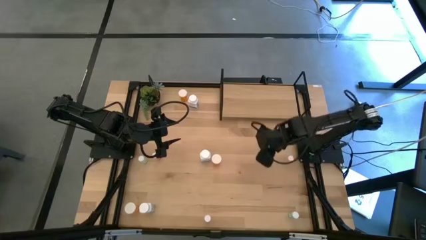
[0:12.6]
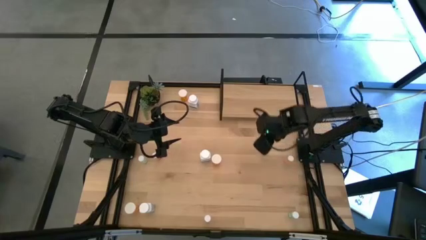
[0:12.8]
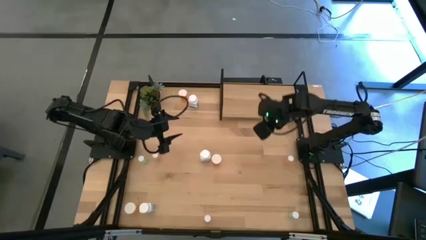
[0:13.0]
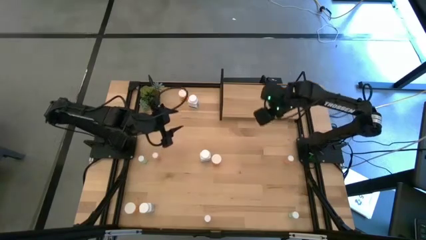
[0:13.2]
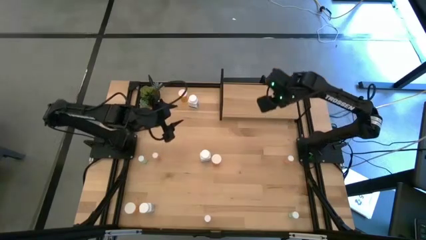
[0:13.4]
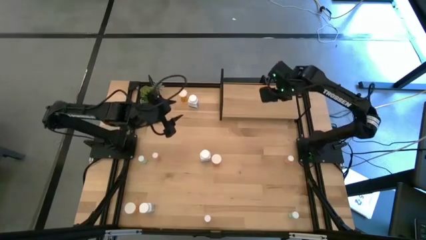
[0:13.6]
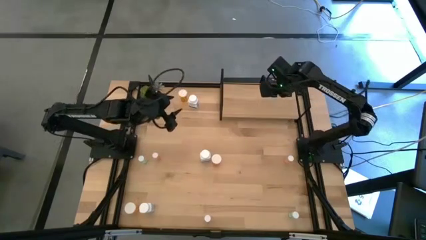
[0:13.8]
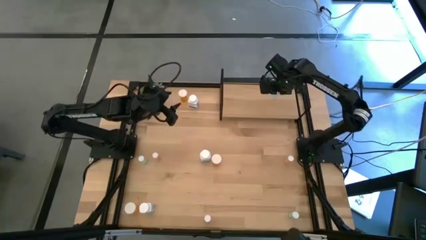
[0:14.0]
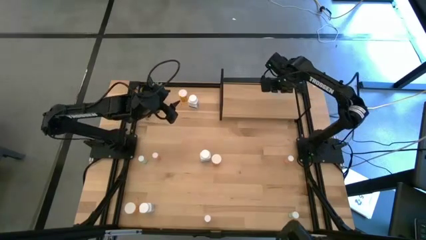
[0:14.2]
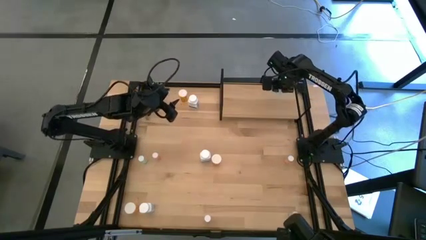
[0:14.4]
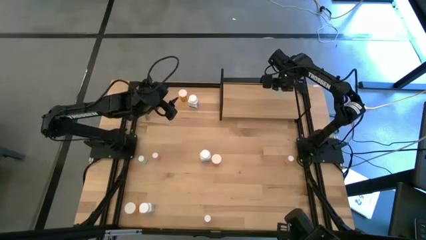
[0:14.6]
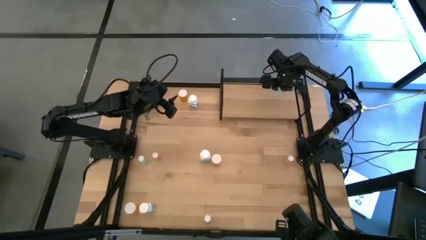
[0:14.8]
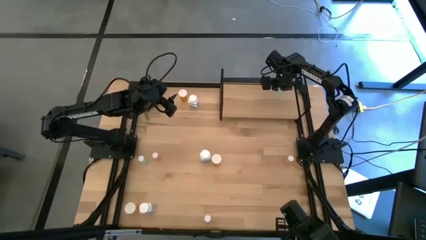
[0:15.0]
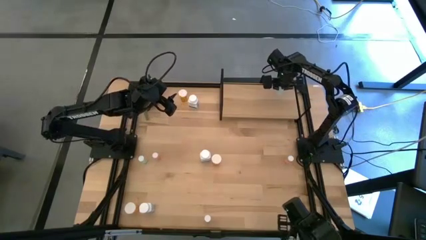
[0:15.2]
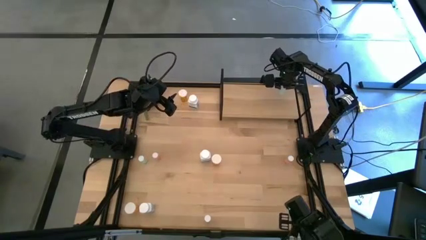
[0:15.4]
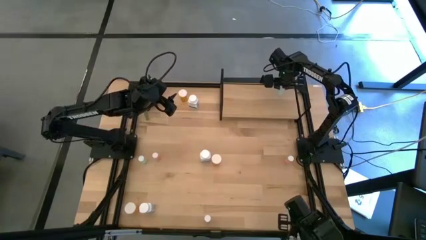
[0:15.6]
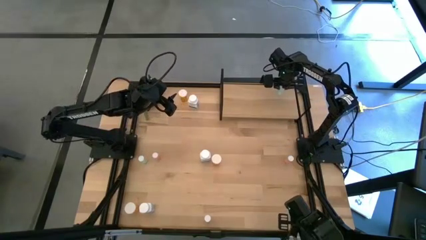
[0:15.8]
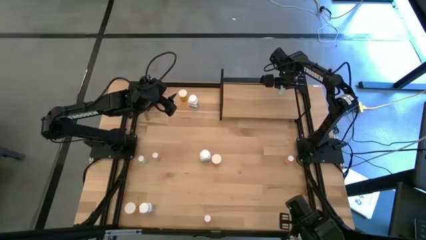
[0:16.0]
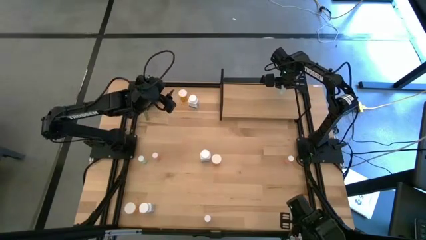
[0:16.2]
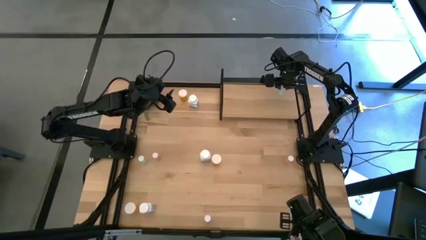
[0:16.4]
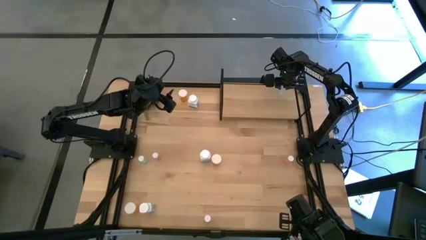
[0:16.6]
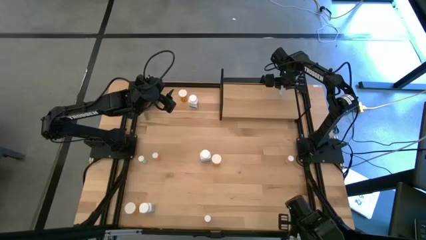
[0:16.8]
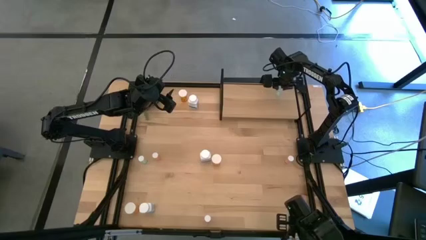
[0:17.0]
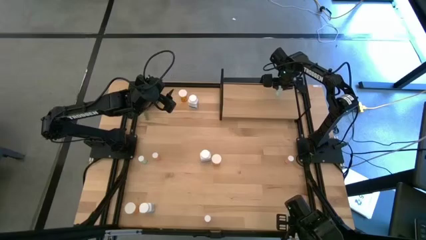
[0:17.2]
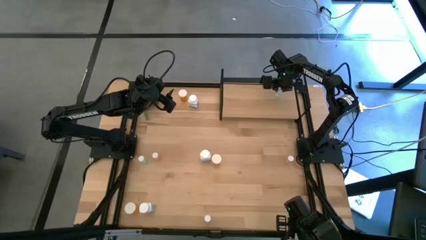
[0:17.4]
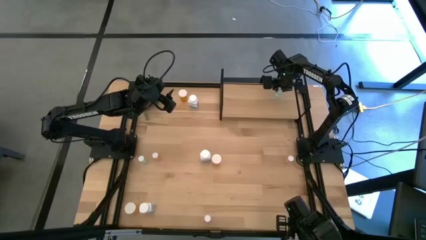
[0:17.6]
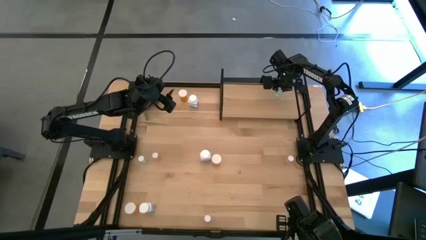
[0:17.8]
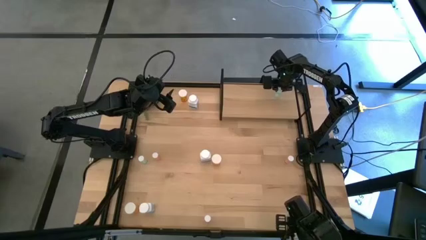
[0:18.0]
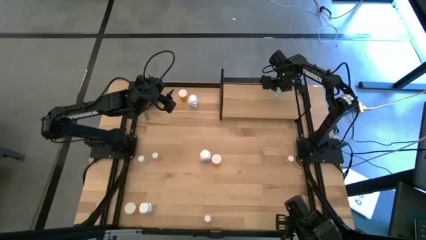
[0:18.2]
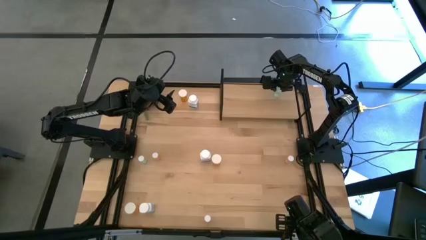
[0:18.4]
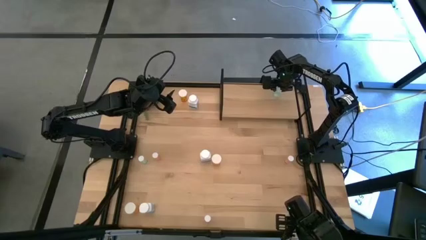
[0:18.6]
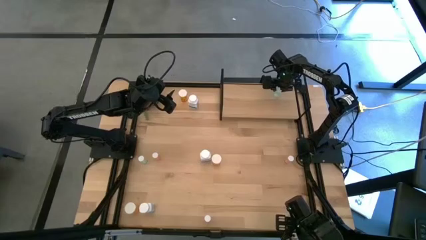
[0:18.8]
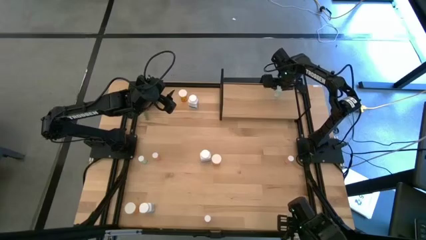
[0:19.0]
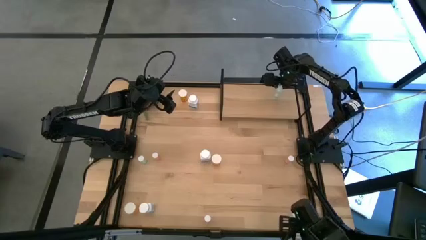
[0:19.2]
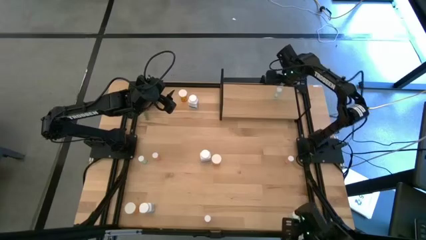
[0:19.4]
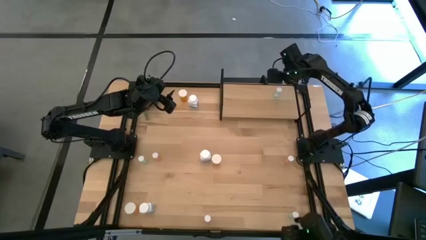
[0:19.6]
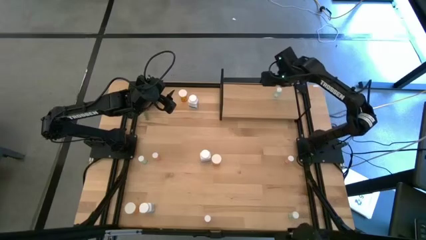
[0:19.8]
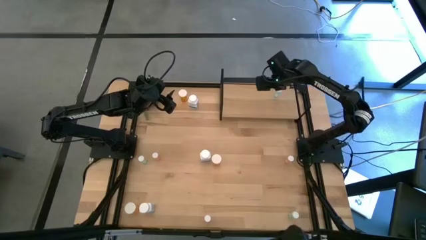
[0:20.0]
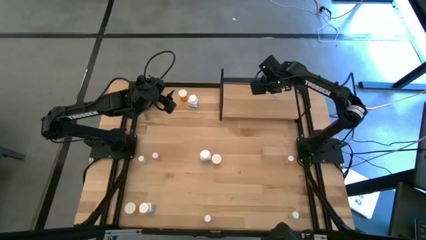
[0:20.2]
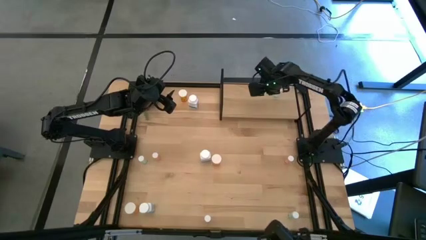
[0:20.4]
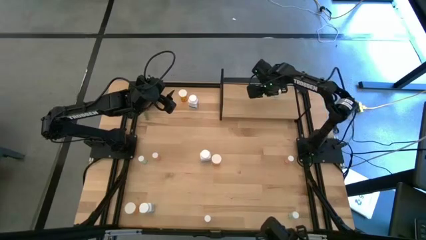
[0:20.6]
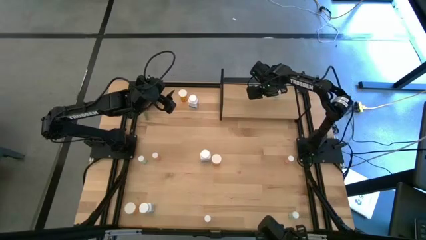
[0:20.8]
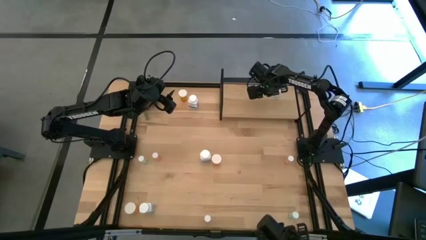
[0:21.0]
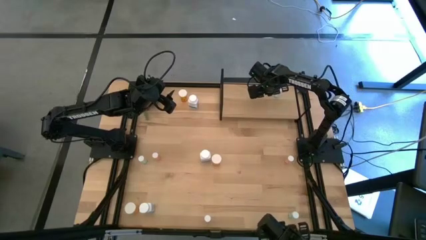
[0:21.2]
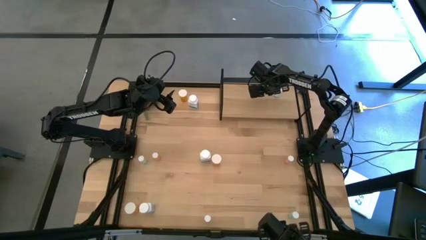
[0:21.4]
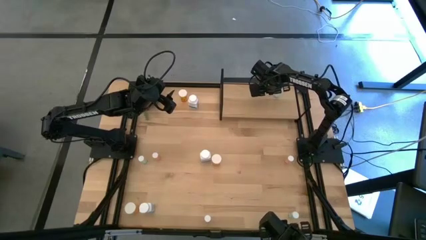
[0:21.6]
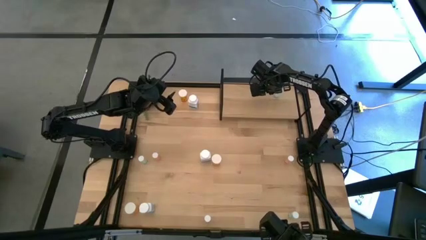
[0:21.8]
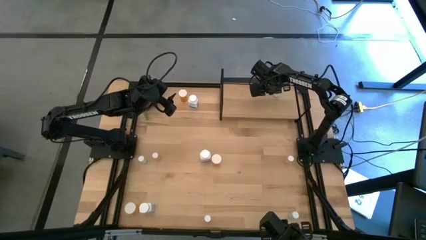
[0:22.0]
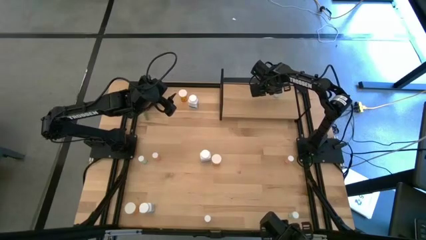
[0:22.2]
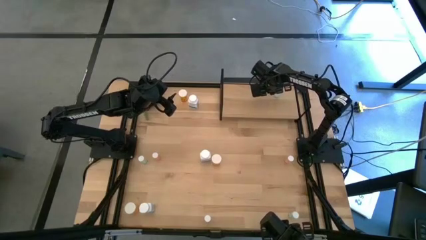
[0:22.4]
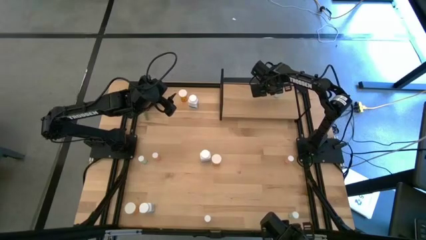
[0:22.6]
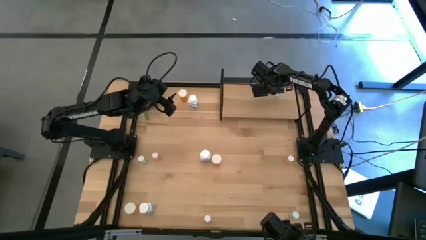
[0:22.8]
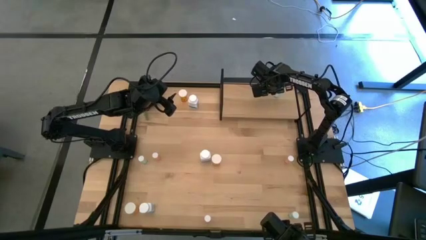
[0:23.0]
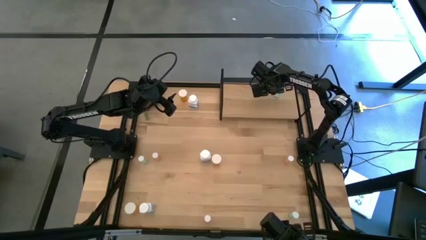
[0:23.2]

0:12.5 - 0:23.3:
Task: Pick and place medicine bottles onto shelf by color
Put the top right blue pill bottle on the shelf
